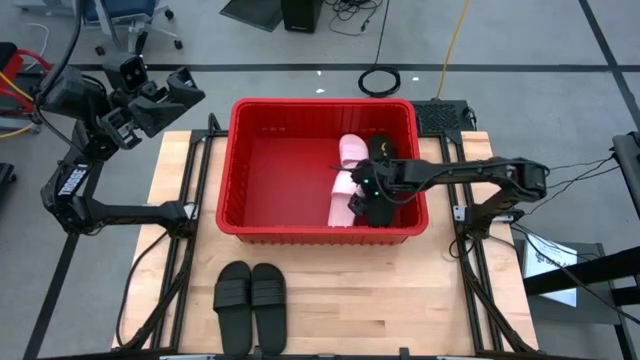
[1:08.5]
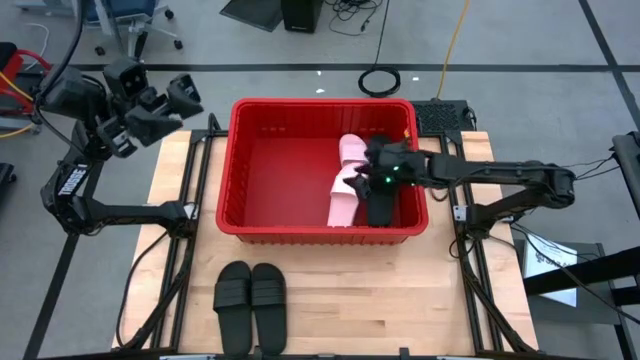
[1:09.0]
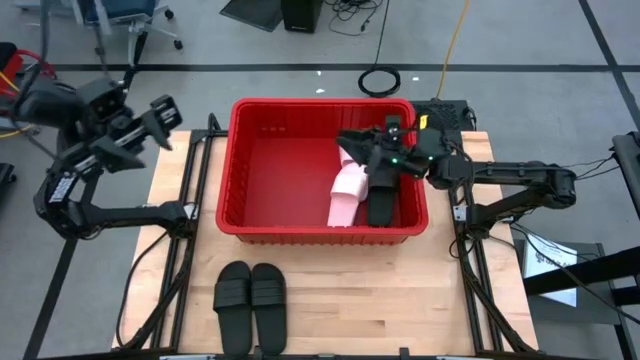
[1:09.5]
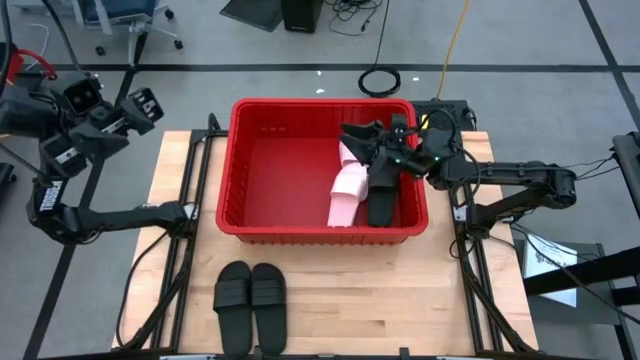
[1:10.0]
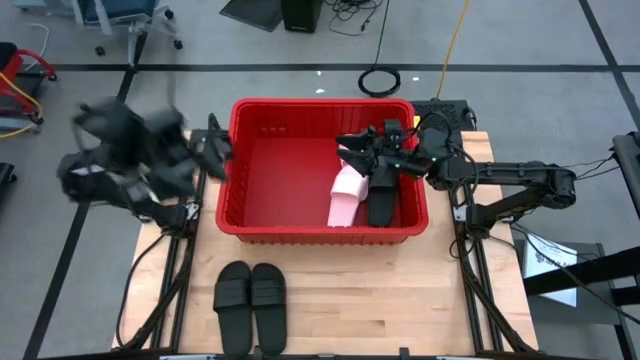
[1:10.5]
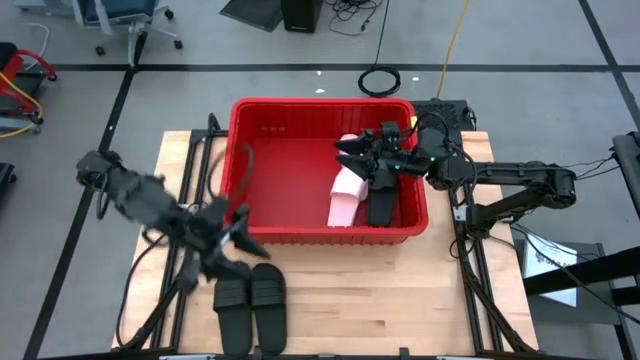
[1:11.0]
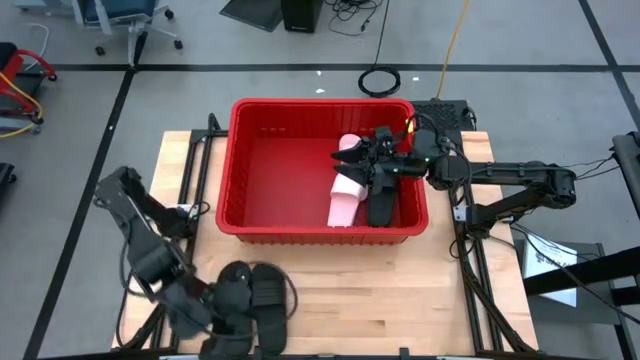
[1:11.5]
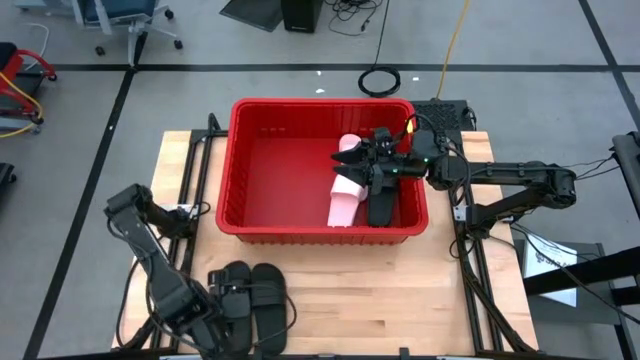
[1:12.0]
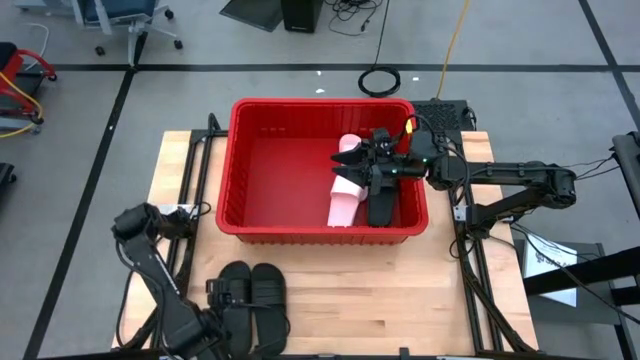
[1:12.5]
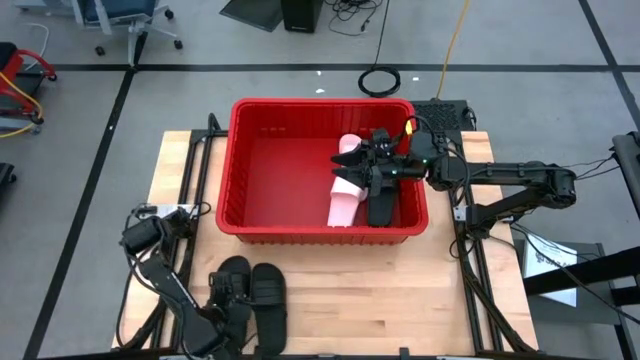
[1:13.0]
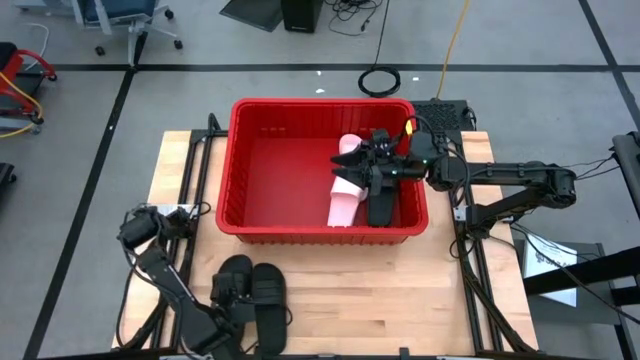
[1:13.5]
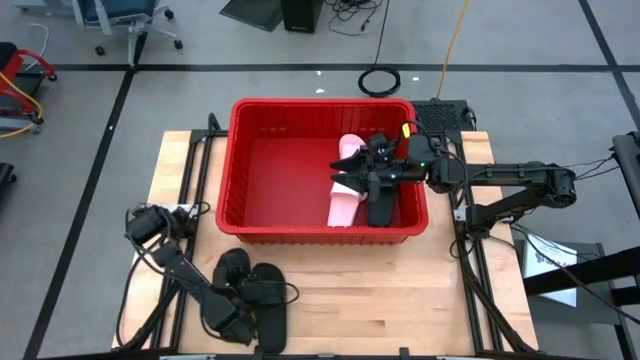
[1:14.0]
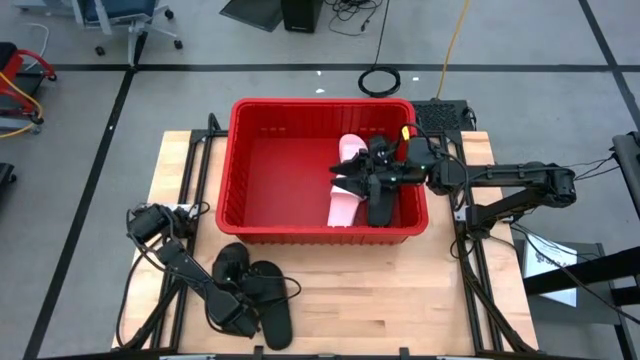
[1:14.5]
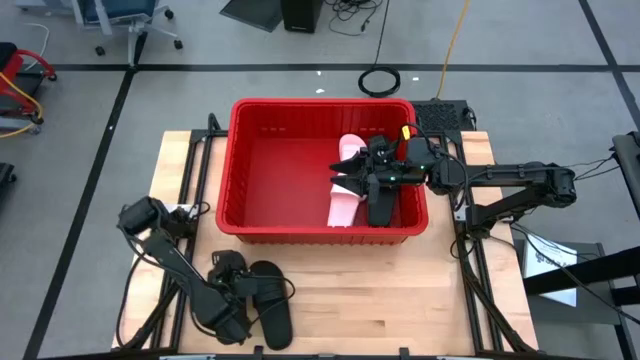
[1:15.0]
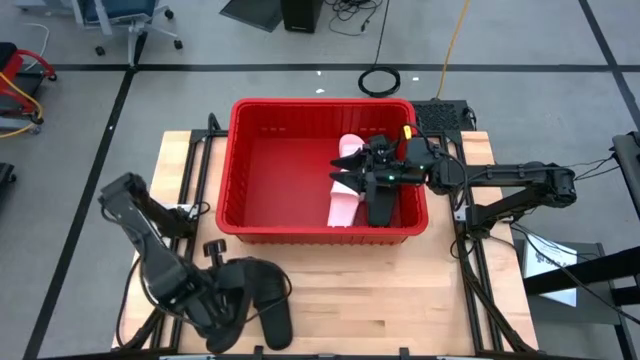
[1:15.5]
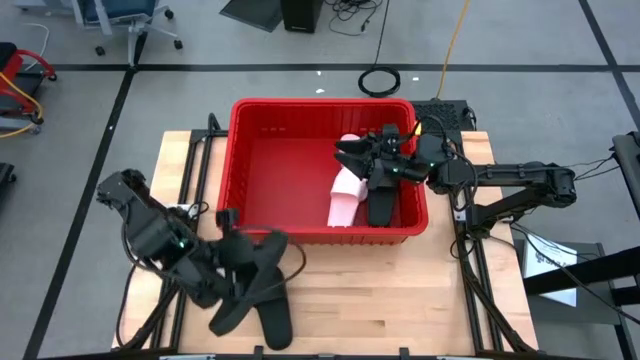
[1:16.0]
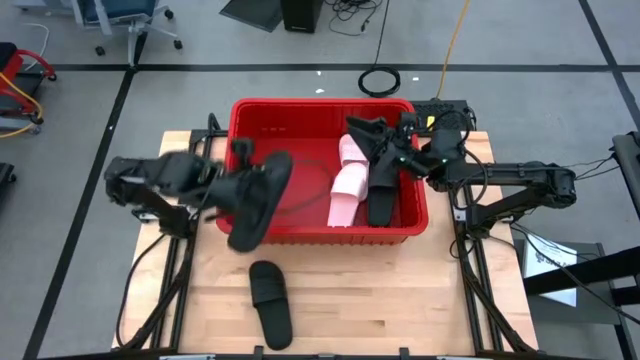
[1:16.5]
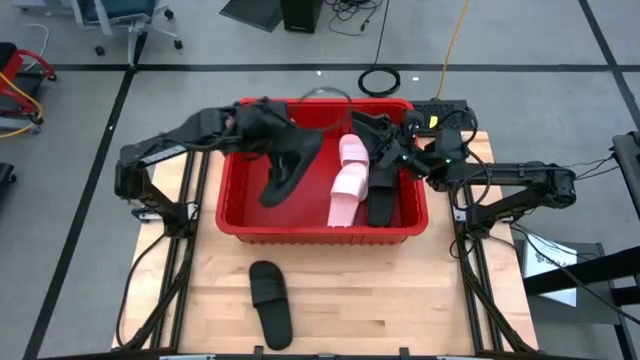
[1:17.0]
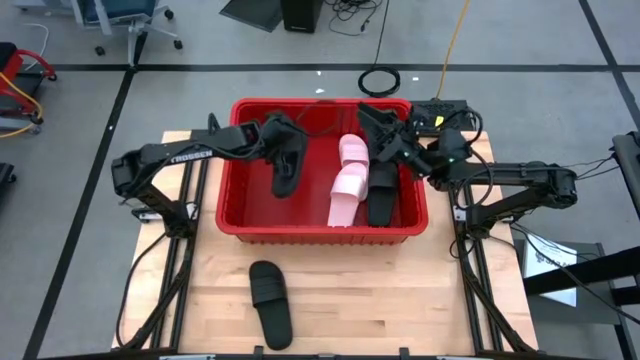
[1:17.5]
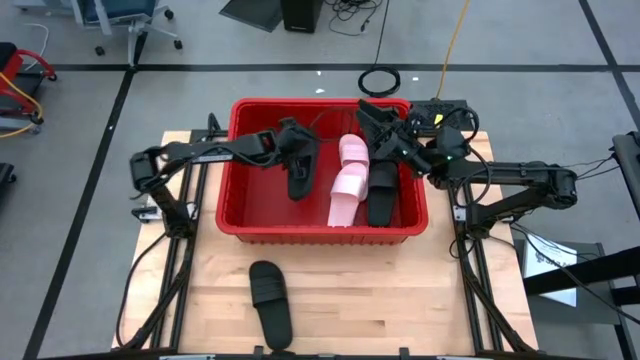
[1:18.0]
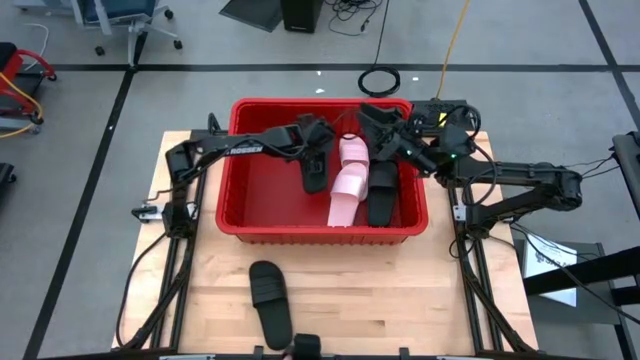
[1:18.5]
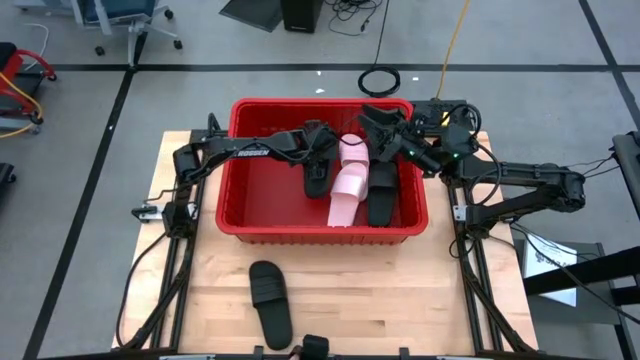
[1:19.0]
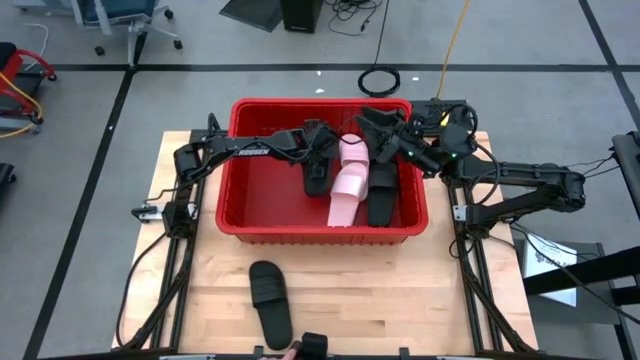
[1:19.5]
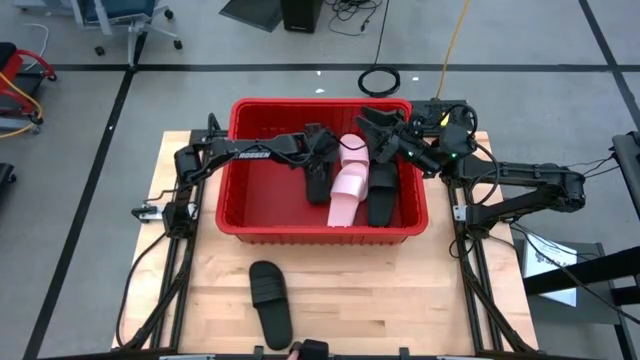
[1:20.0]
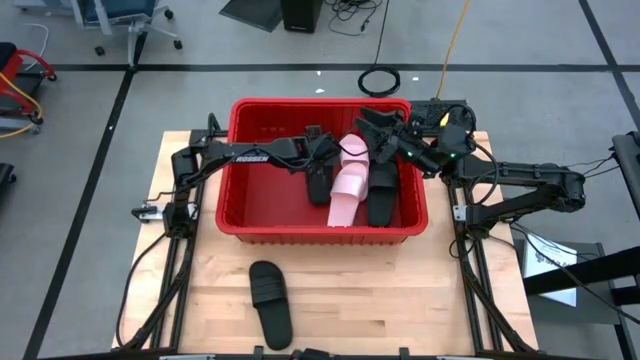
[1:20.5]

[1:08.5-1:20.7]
Task: Pick and place slides into bin
Put the black slide into the red container

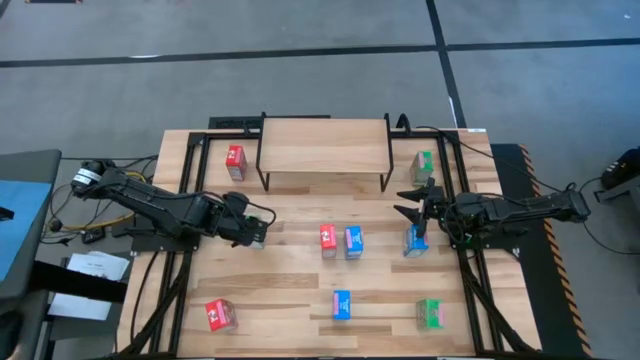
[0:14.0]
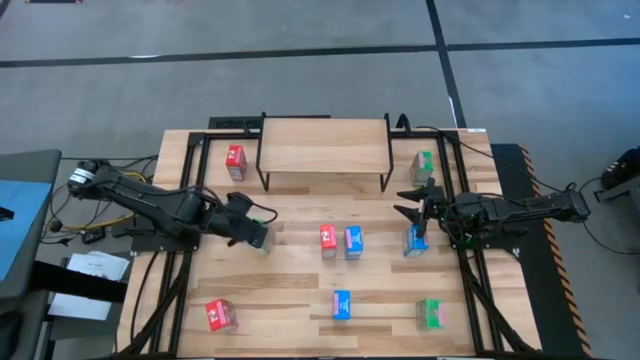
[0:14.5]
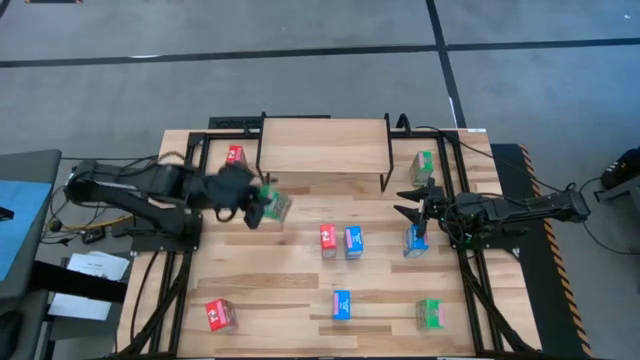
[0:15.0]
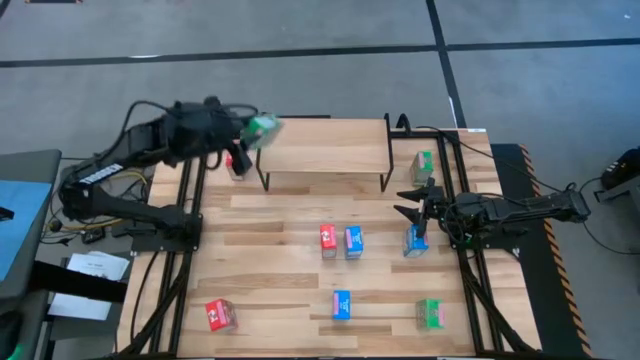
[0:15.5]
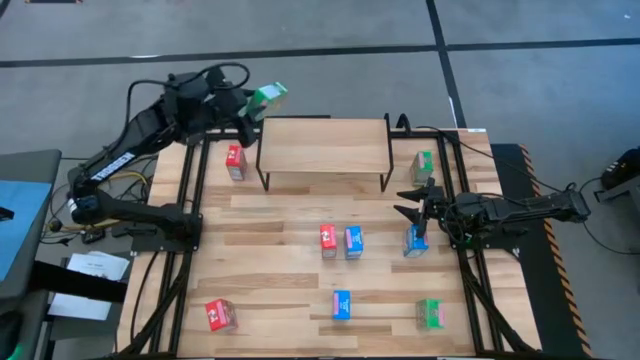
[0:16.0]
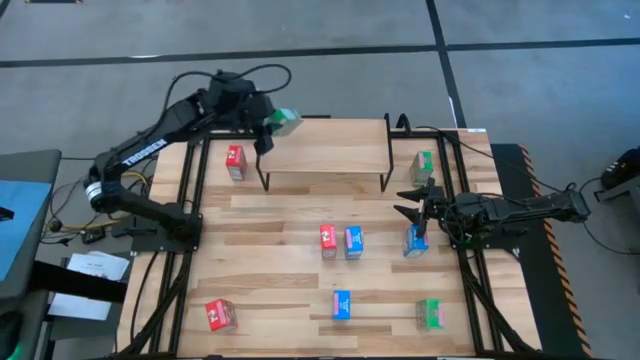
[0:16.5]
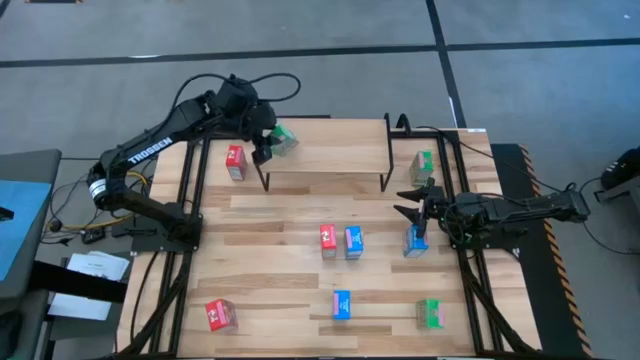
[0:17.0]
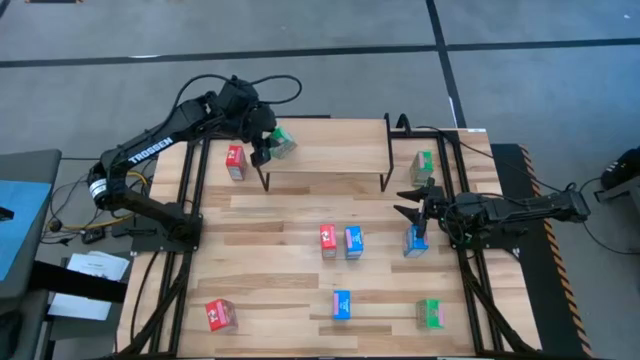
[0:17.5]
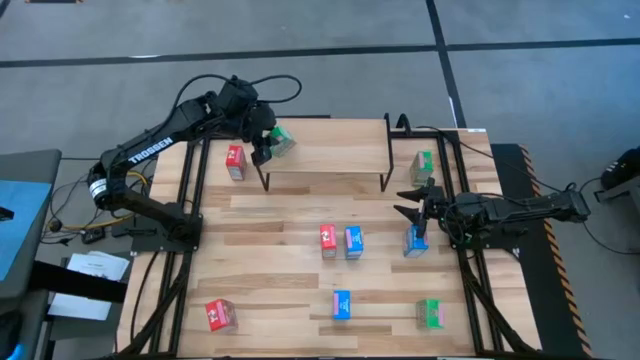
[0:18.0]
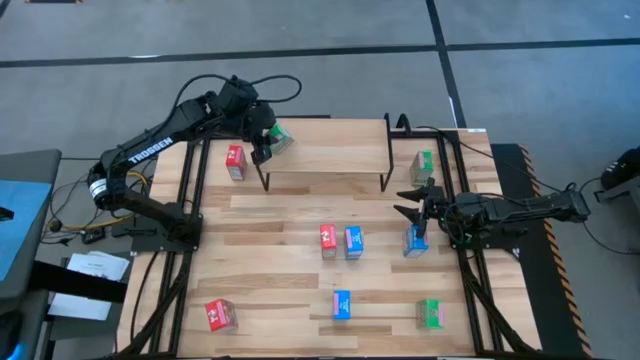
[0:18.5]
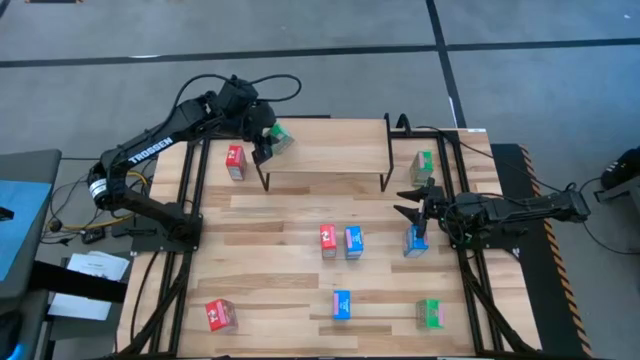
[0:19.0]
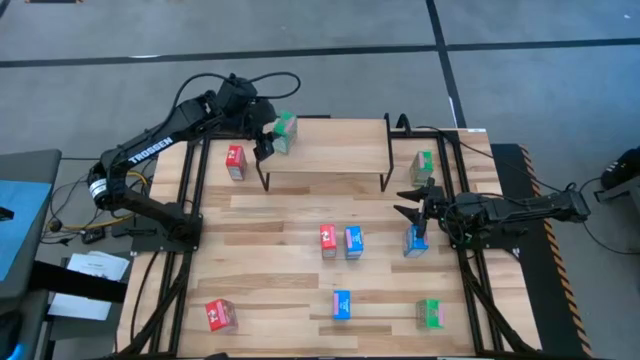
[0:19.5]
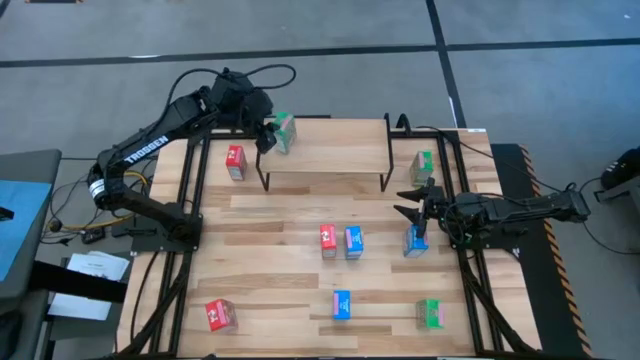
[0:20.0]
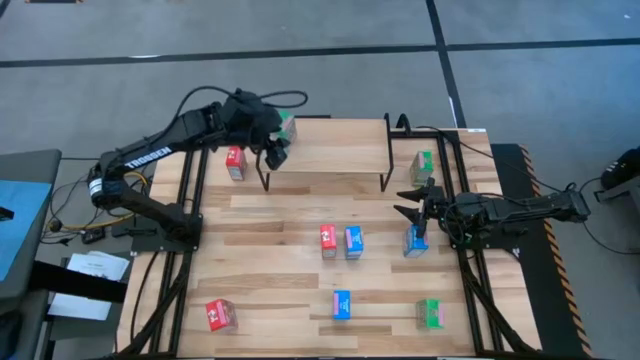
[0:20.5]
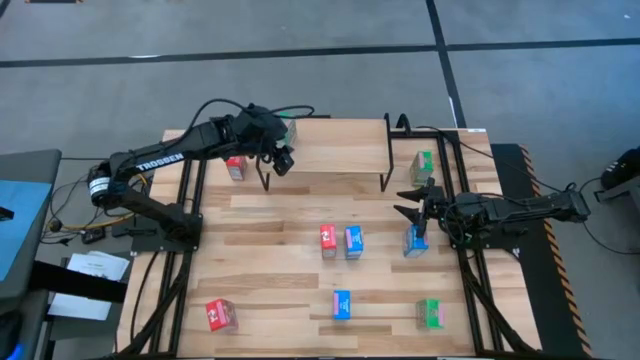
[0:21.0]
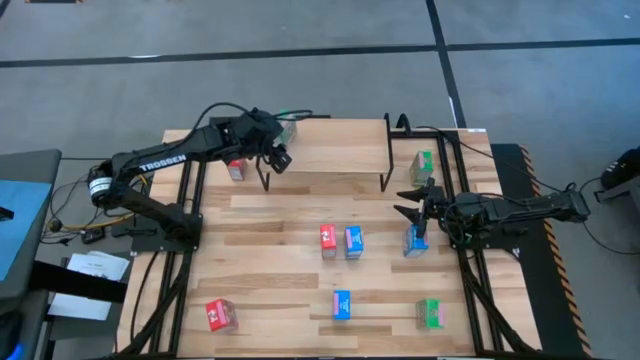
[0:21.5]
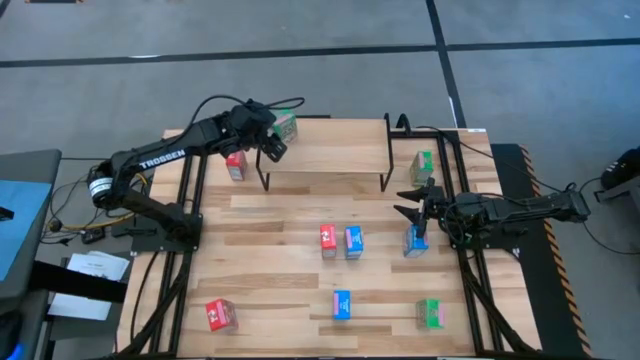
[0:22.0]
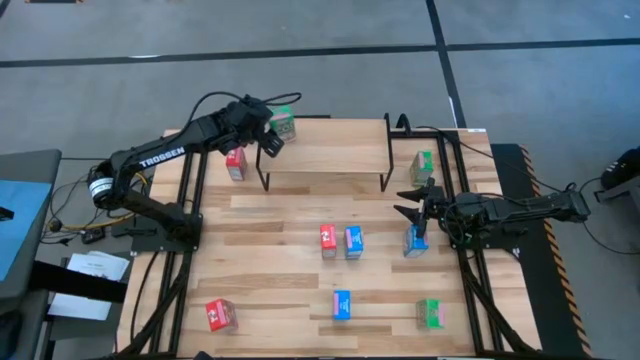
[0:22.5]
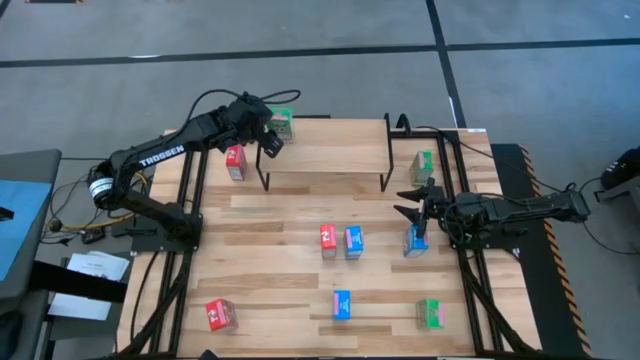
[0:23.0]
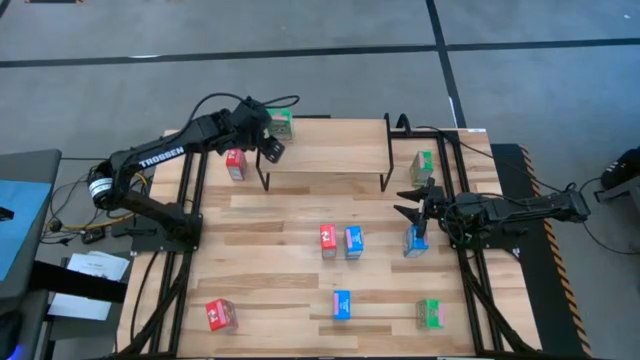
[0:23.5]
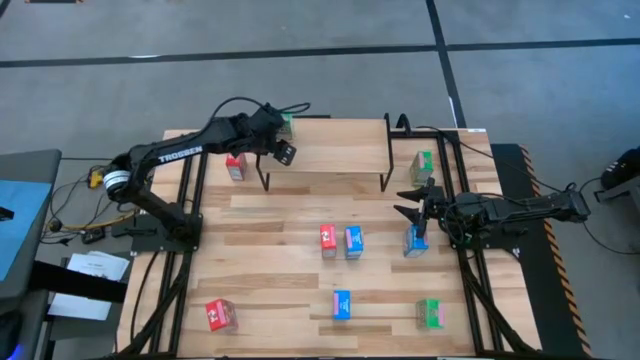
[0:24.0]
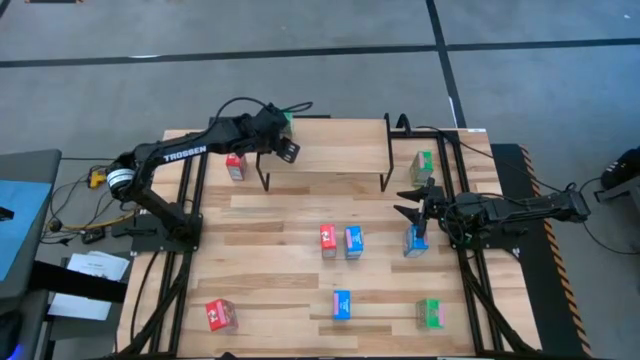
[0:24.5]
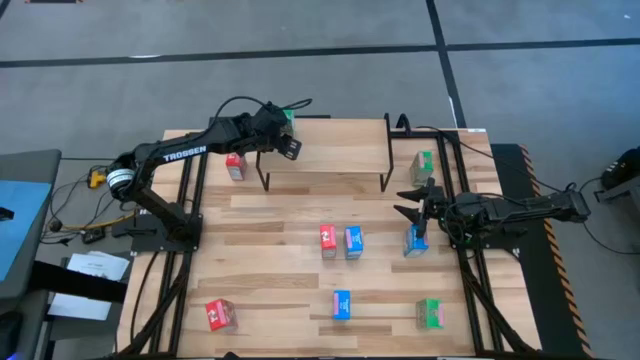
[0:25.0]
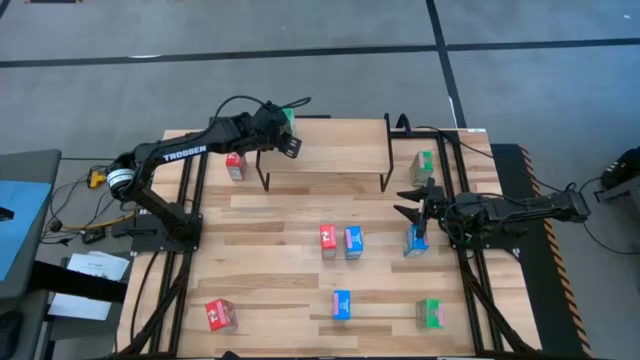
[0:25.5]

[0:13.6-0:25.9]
Task: Stack cereal on shelf
Put the middle left green cereal box on the shelf
